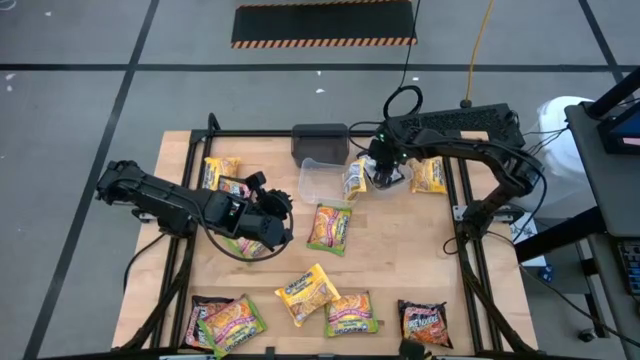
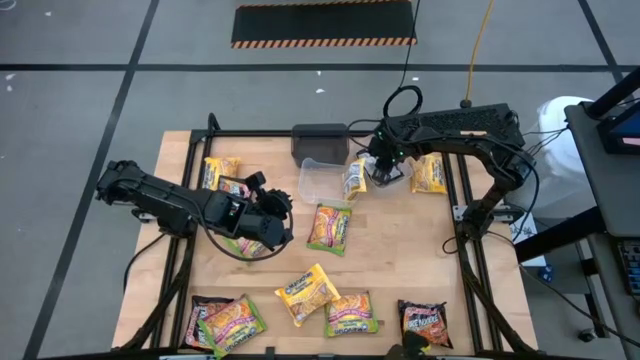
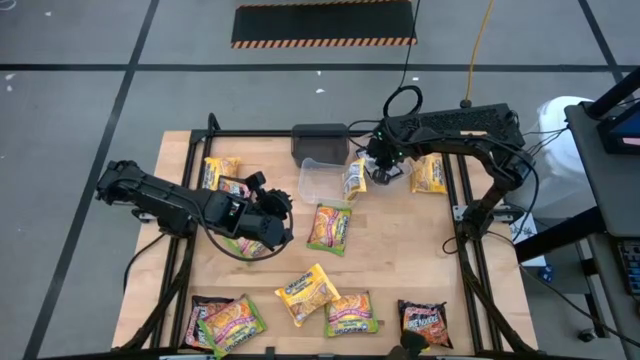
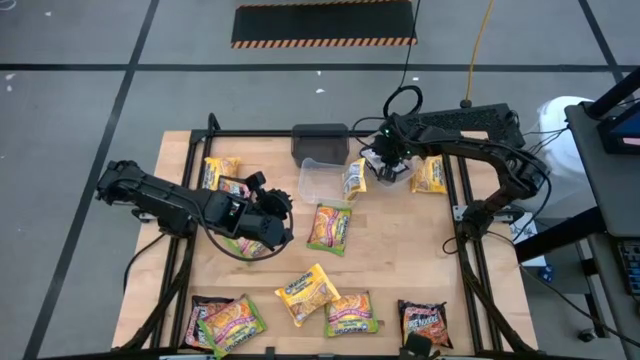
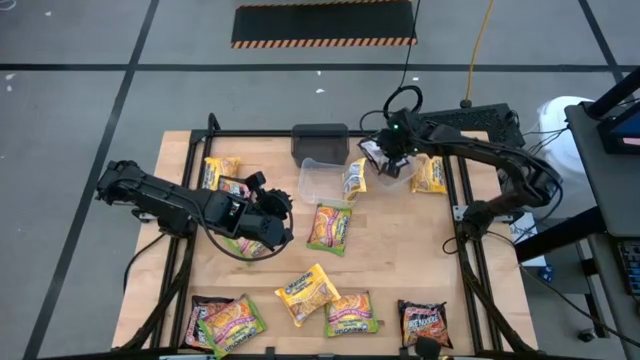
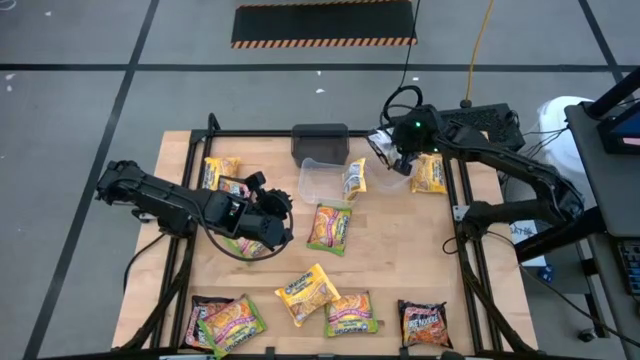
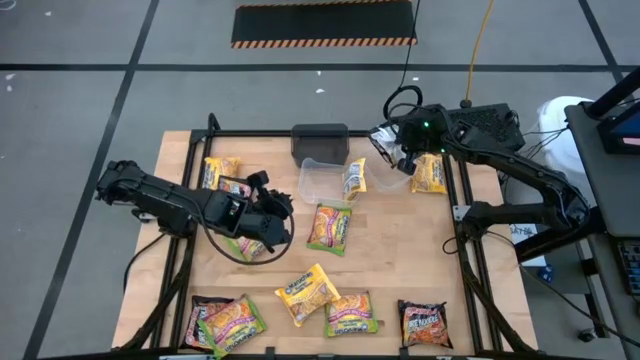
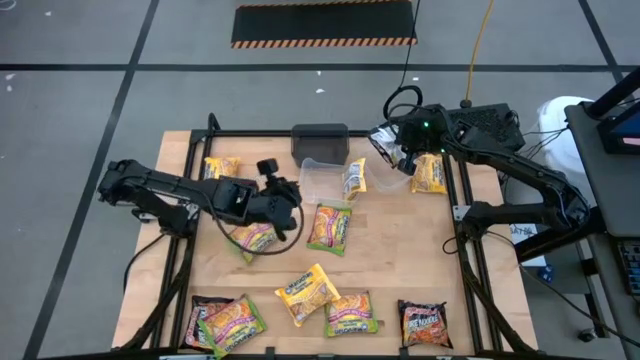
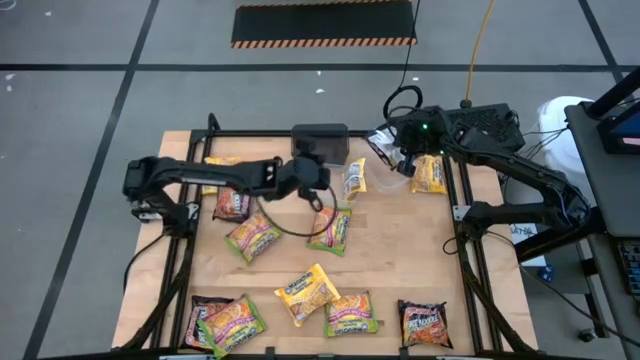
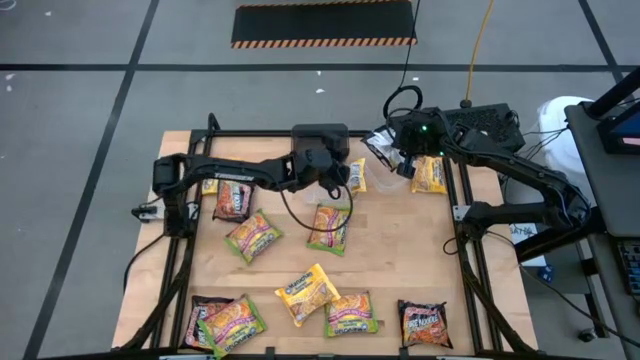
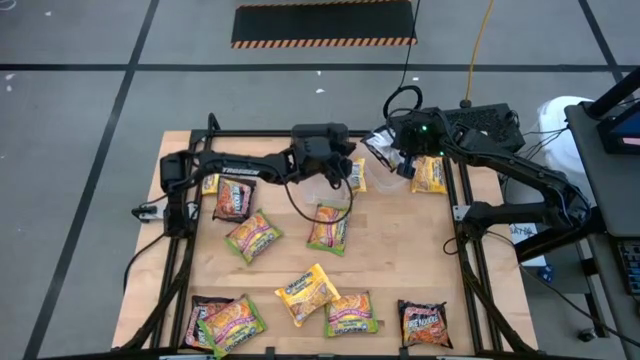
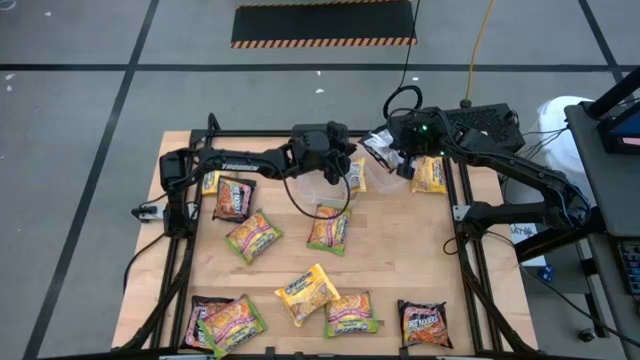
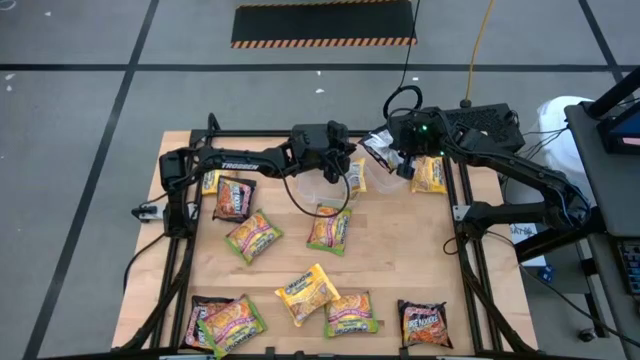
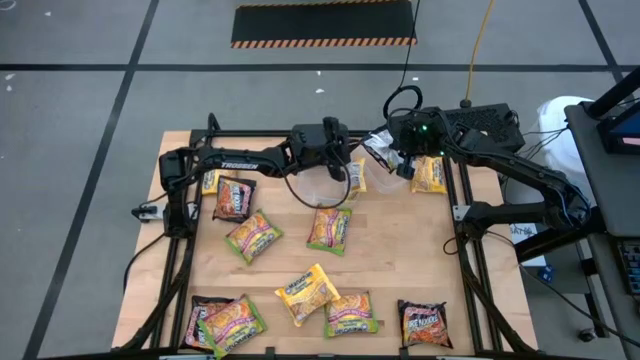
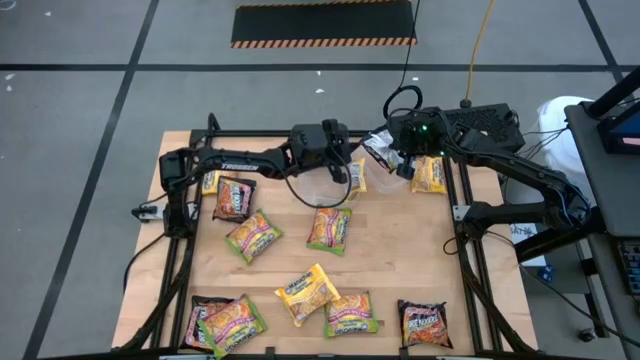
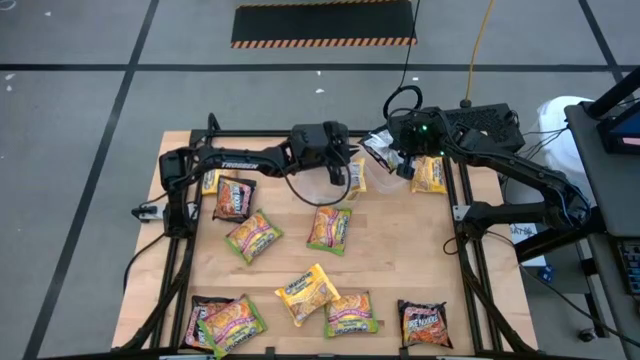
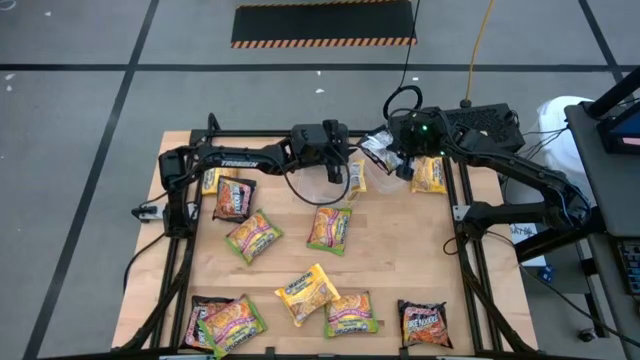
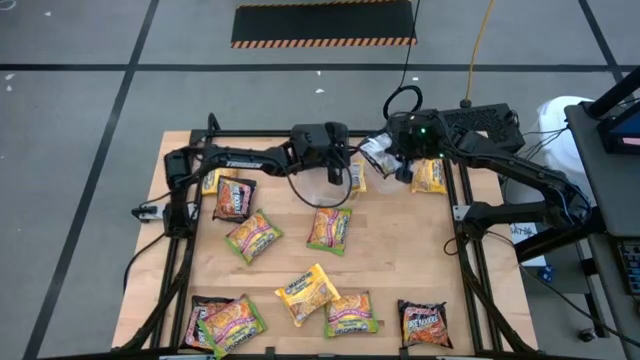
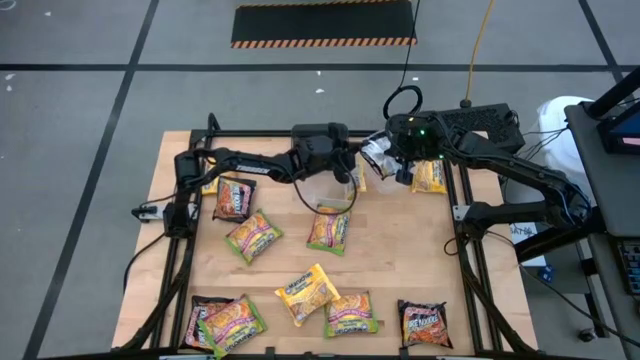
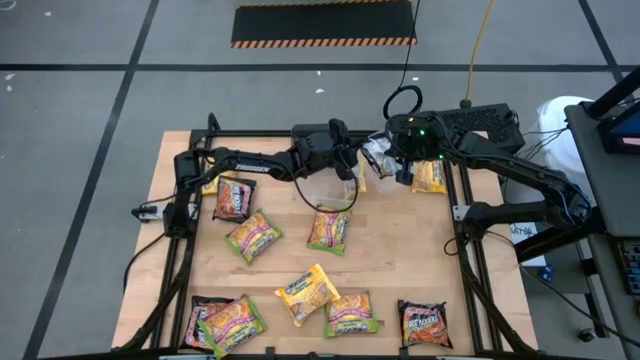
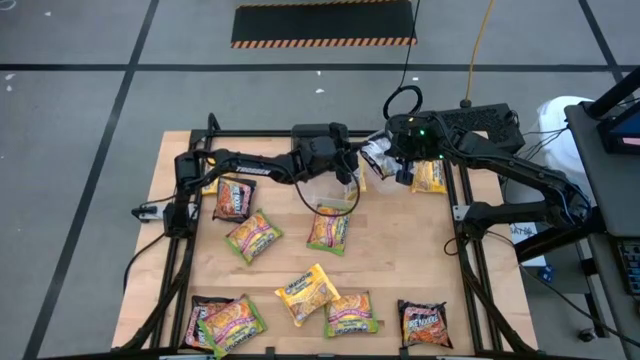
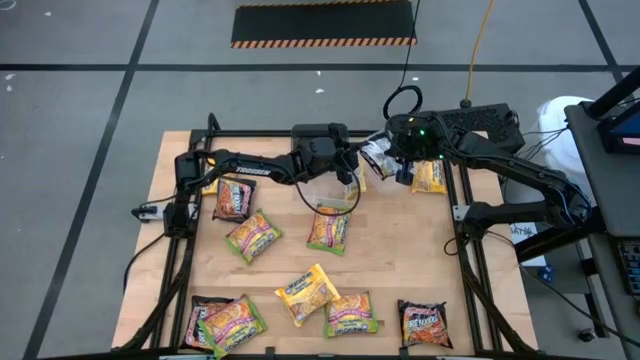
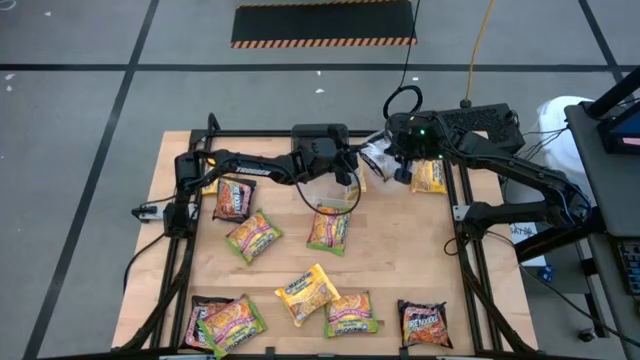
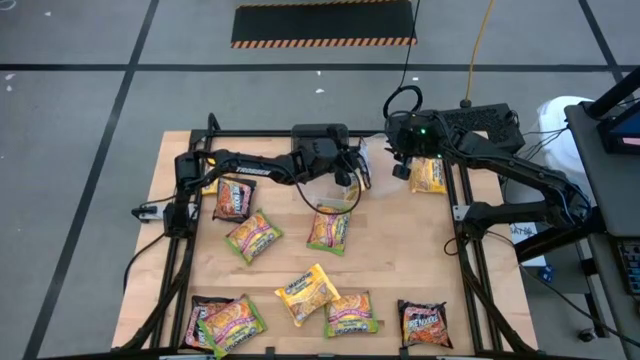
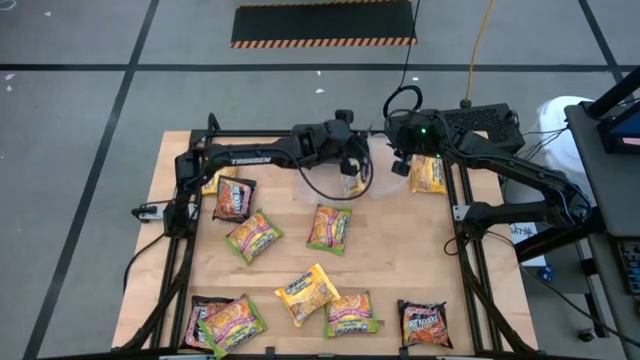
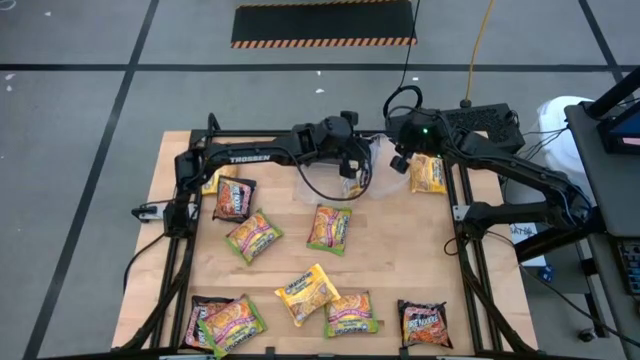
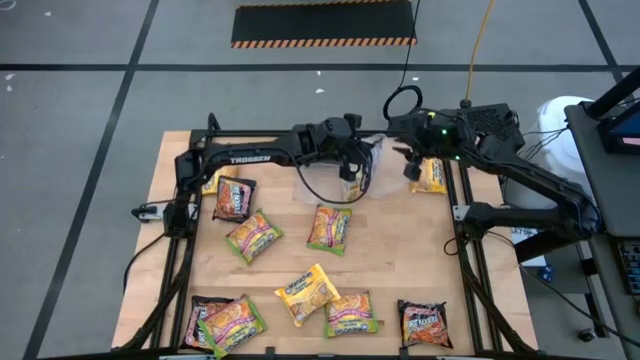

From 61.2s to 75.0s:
Task: Sort Maruchan noodles
Put the black noodle pack into the right transparent bin

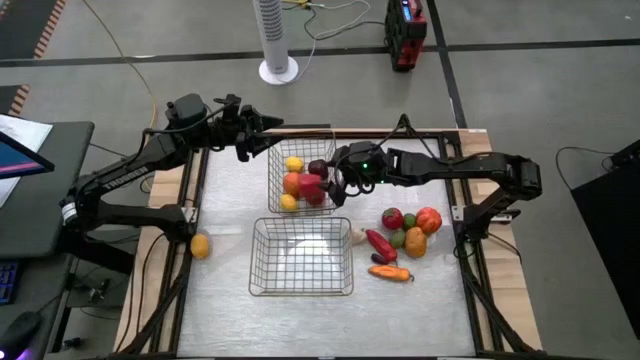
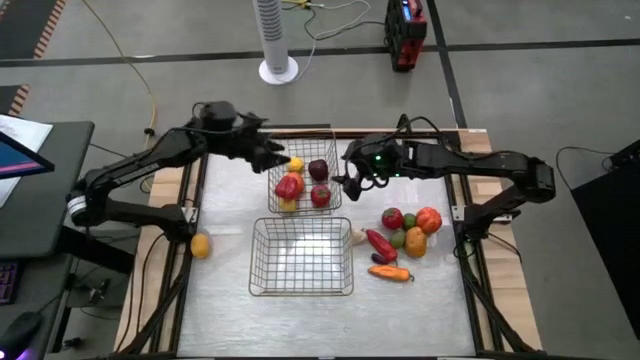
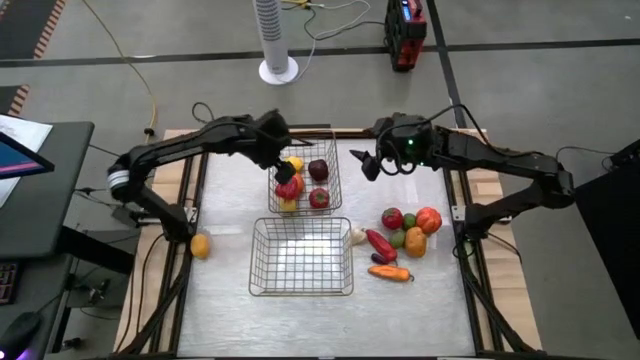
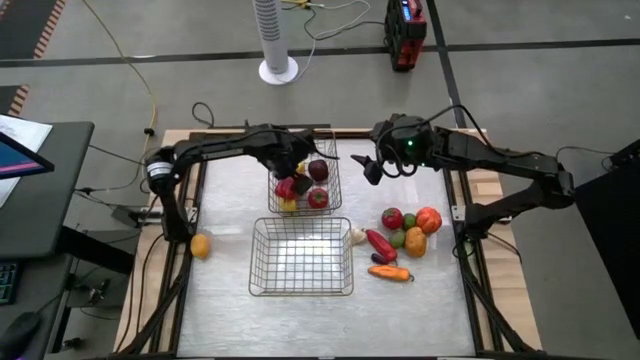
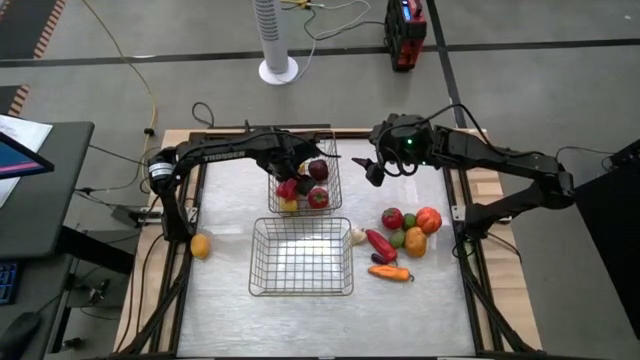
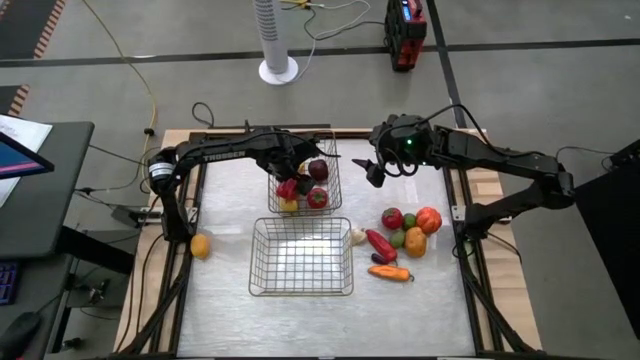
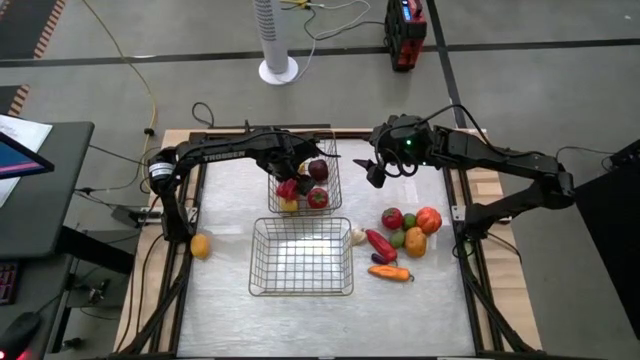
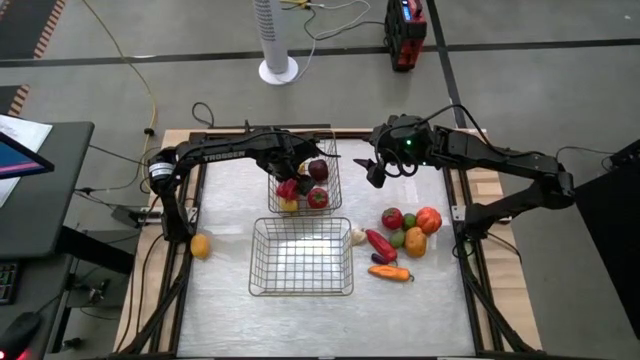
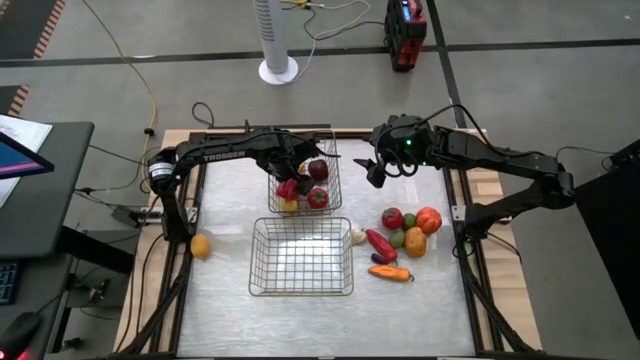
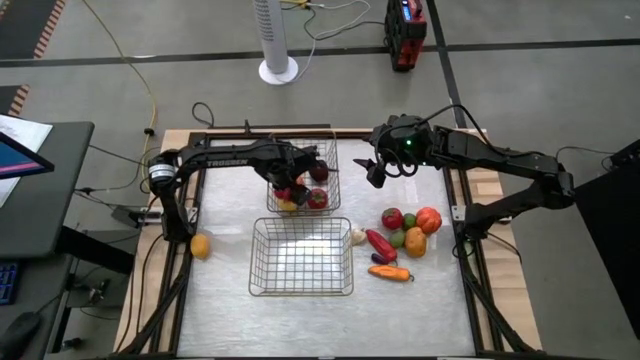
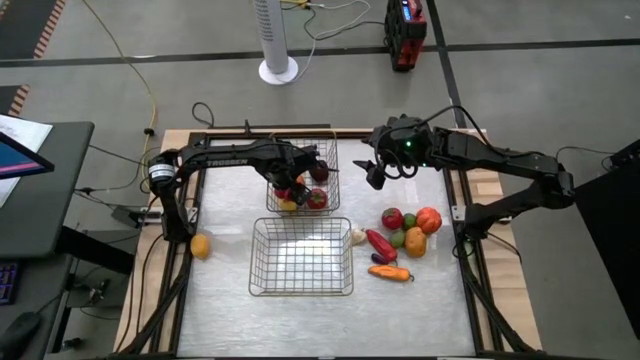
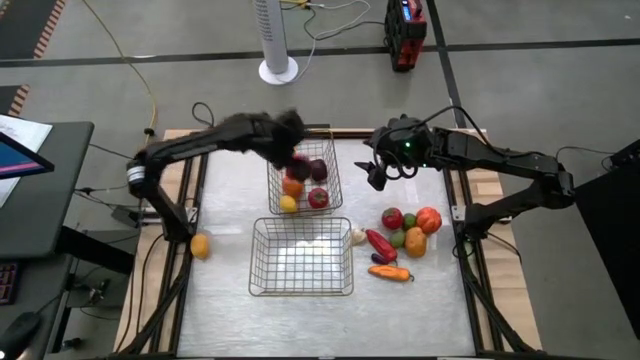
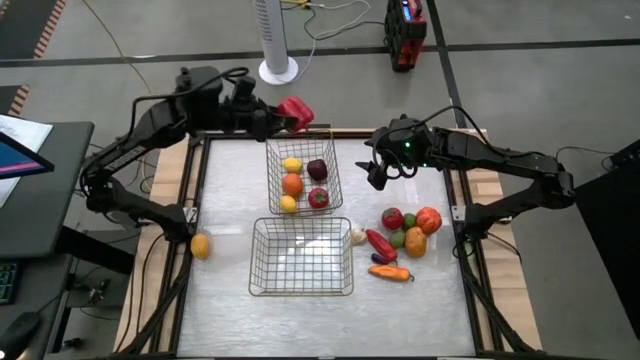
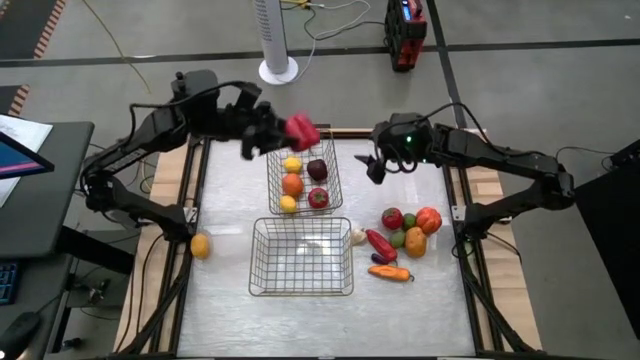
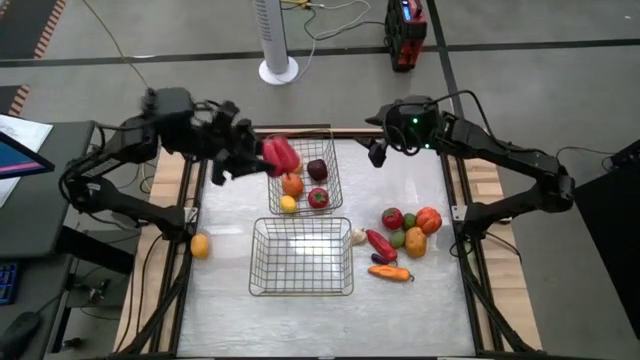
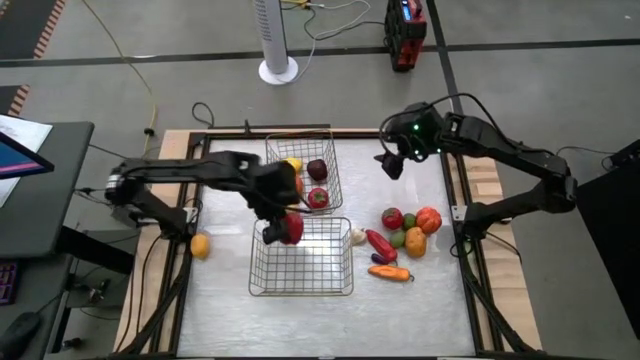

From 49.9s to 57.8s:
Task: Sort produce into baskets
Put the red bell pepper into the bottom wire basket
